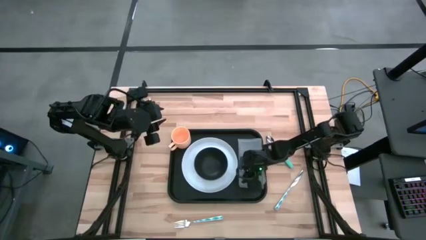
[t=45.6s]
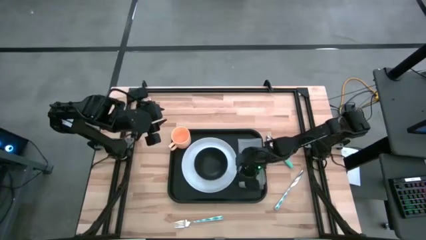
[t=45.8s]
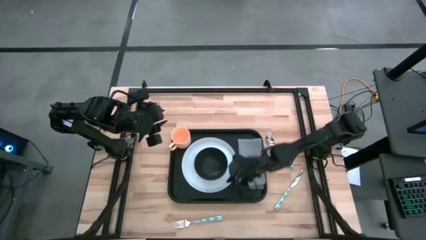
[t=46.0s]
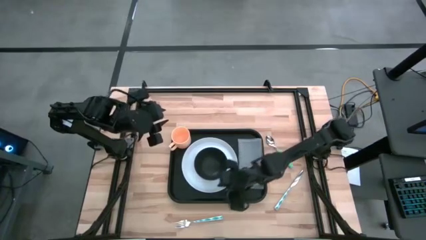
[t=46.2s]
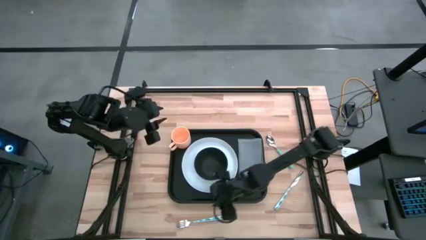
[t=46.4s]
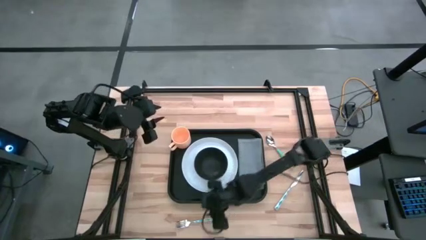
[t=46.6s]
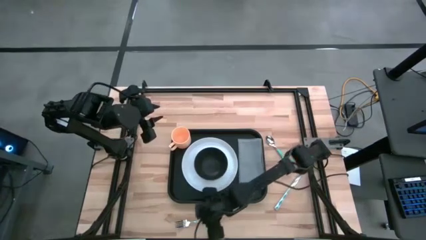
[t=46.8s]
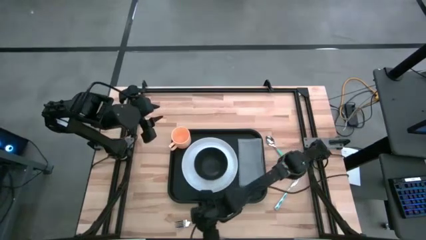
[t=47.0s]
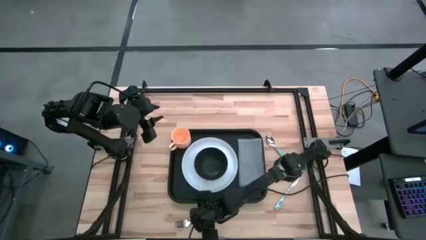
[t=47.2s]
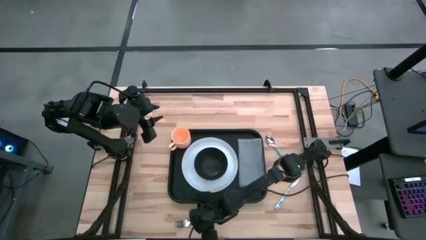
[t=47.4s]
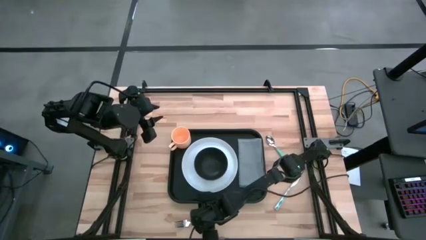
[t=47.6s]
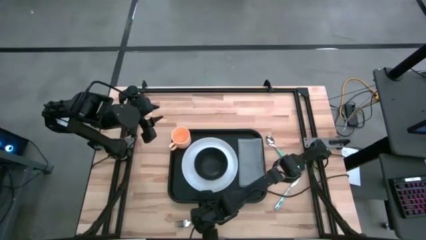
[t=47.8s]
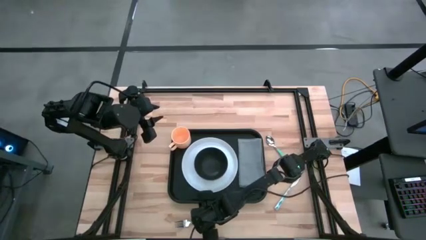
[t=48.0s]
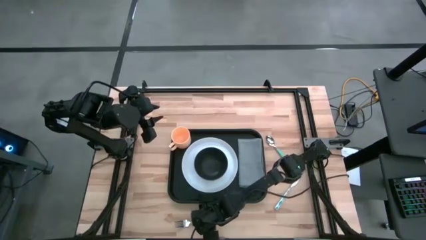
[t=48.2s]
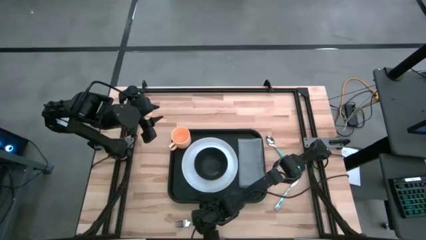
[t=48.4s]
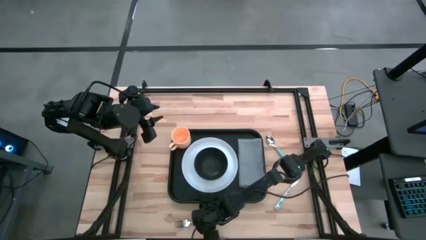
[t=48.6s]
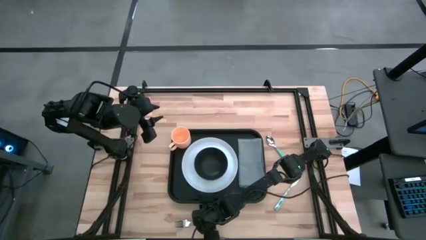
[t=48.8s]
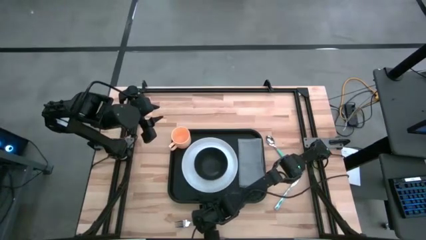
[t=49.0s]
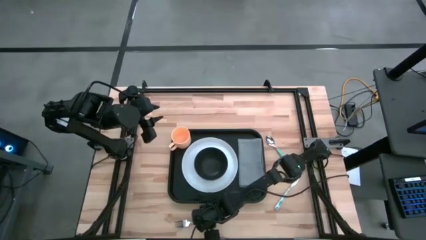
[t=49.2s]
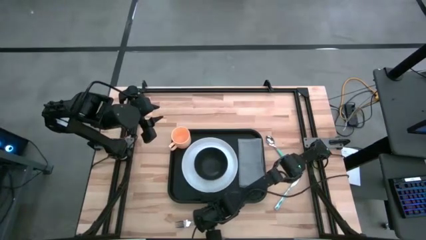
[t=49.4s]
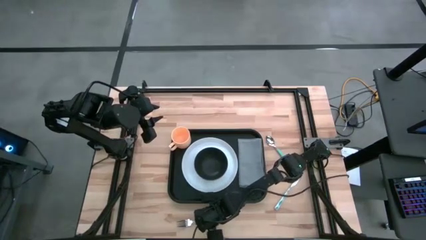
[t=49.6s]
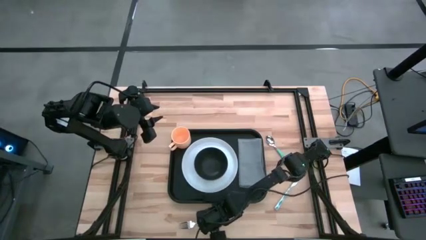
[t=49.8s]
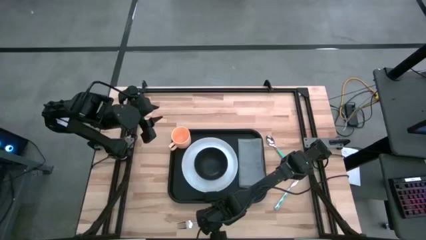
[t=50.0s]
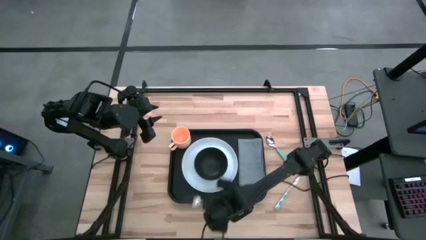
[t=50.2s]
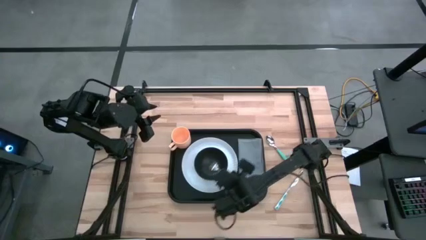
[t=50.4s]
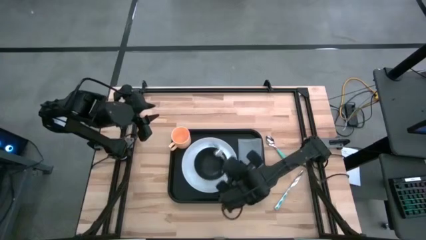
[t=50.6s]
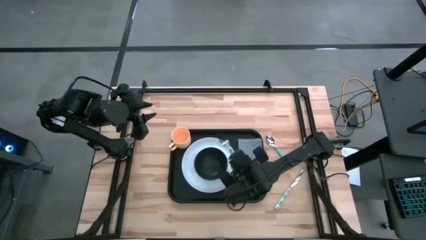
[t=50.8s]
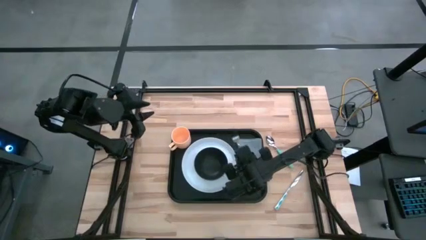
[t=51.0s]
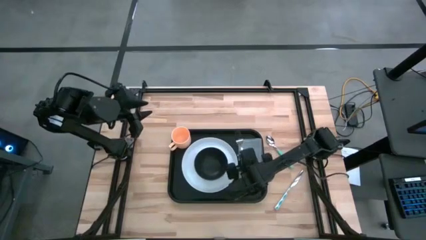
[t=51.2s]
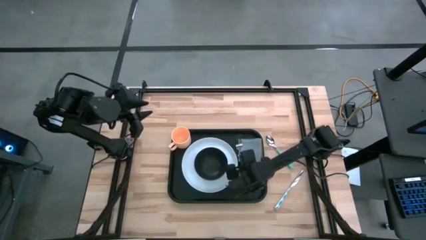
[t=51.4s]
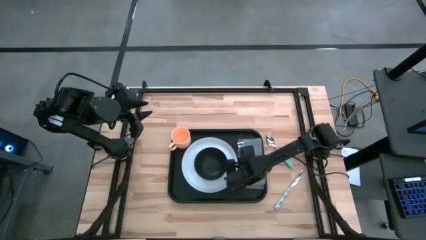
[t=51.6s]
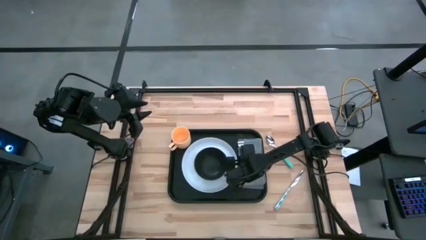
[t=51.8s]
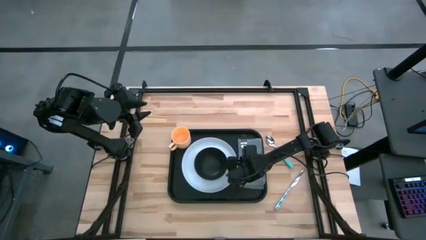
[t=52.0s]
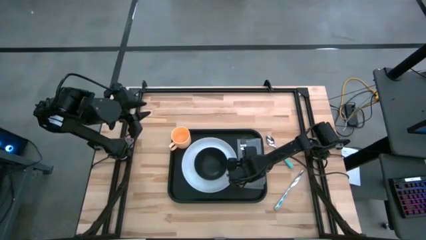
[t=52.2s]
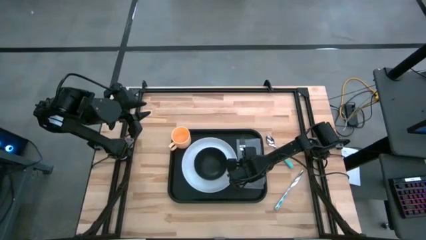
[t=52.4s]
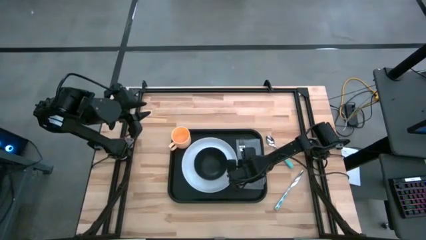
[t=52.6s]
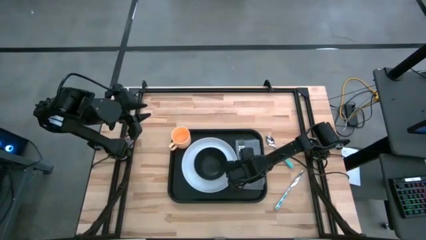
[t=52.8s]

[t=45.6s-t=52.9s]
Task: Set up tray
Put the blue patterned fork on top of the gray napkin on the black serving tray

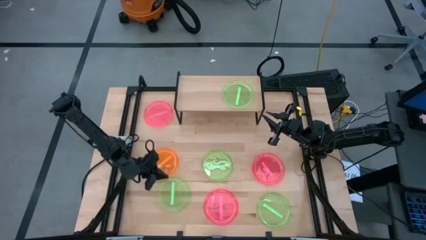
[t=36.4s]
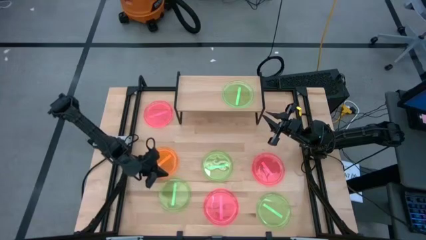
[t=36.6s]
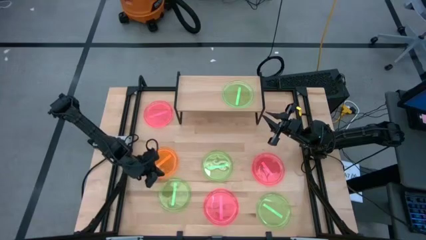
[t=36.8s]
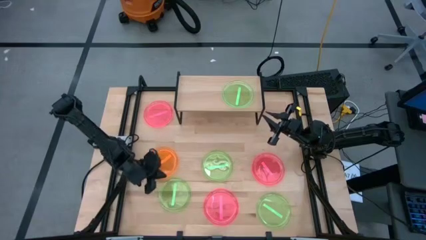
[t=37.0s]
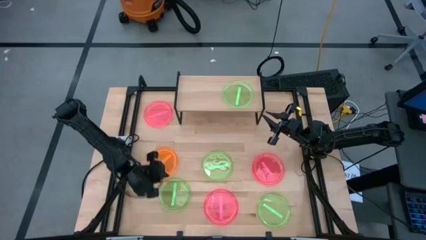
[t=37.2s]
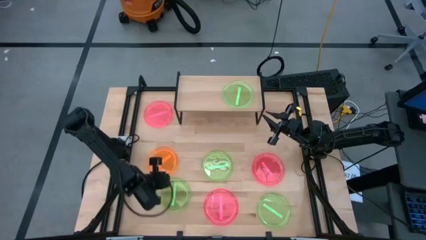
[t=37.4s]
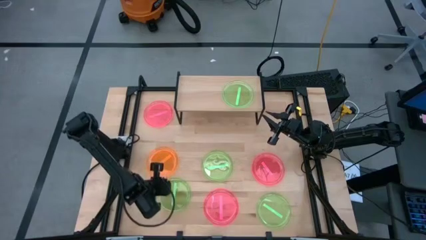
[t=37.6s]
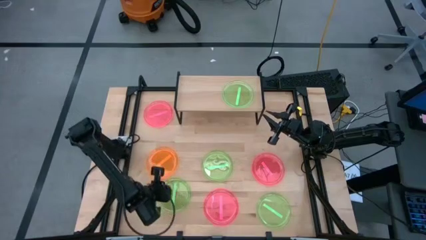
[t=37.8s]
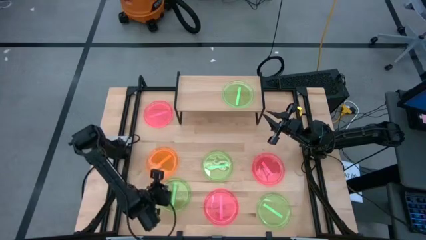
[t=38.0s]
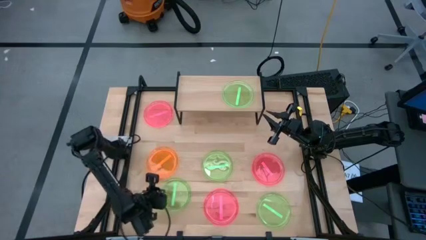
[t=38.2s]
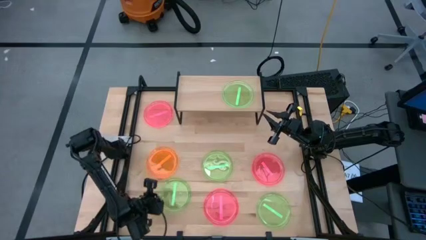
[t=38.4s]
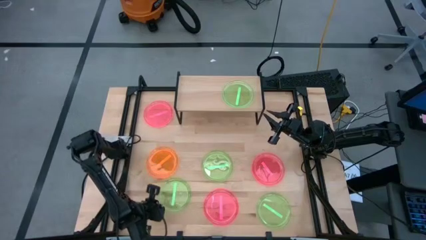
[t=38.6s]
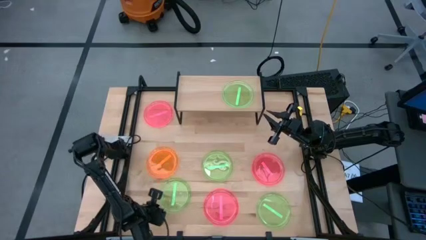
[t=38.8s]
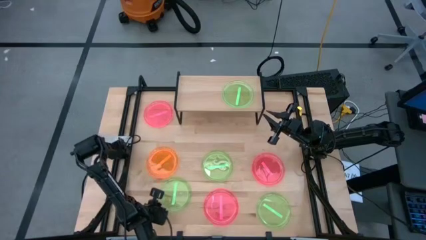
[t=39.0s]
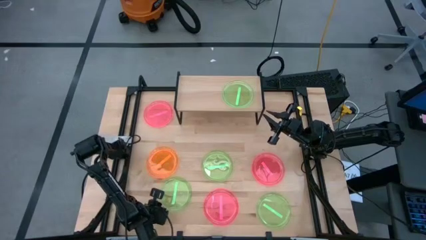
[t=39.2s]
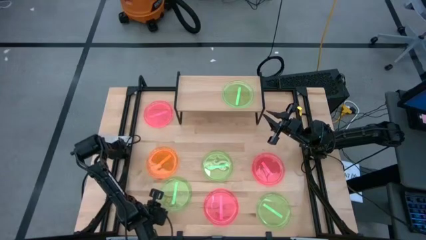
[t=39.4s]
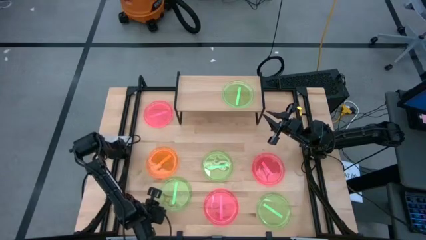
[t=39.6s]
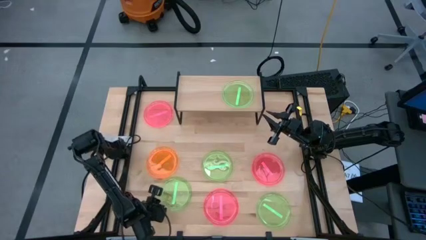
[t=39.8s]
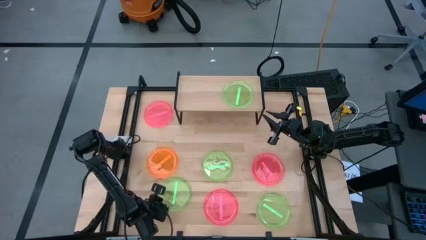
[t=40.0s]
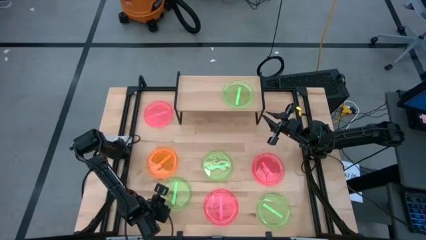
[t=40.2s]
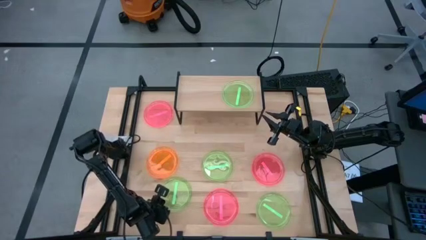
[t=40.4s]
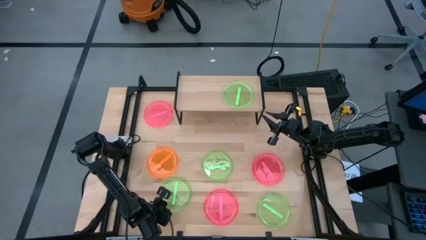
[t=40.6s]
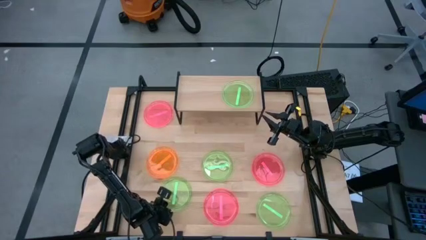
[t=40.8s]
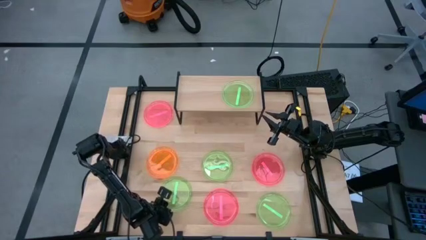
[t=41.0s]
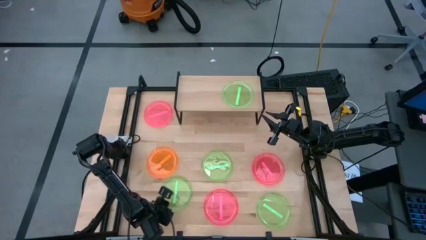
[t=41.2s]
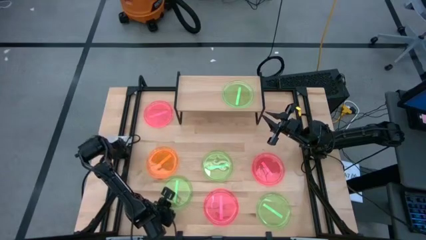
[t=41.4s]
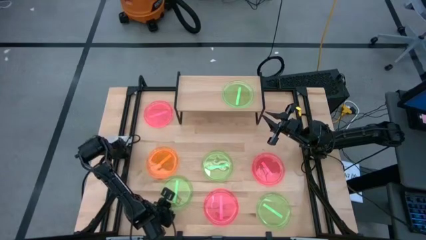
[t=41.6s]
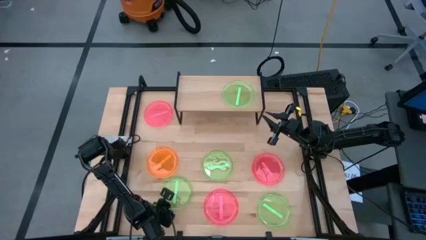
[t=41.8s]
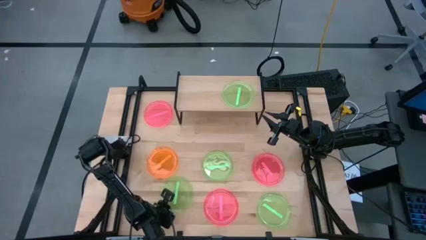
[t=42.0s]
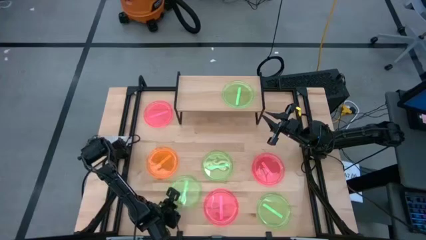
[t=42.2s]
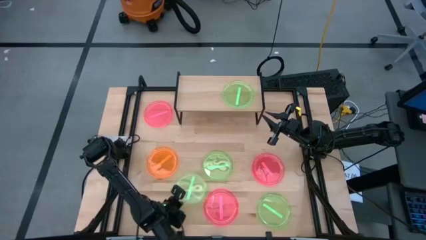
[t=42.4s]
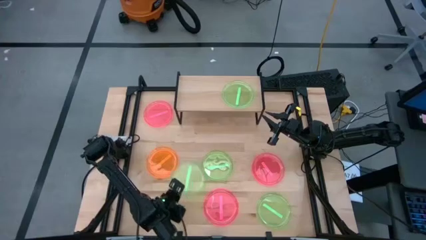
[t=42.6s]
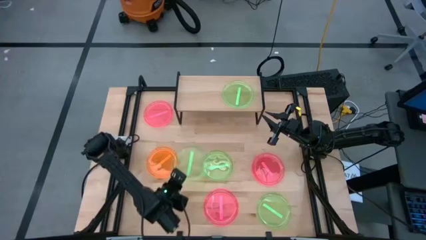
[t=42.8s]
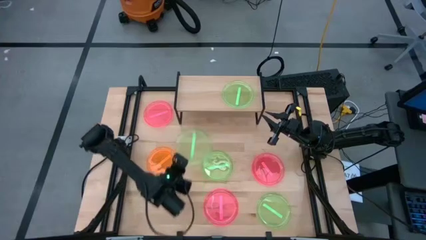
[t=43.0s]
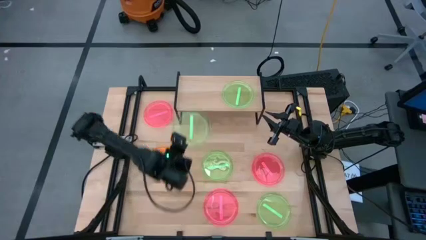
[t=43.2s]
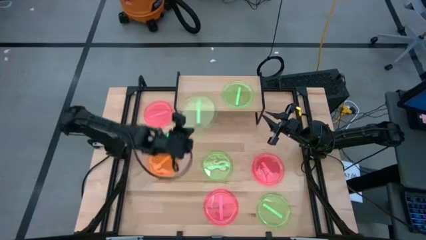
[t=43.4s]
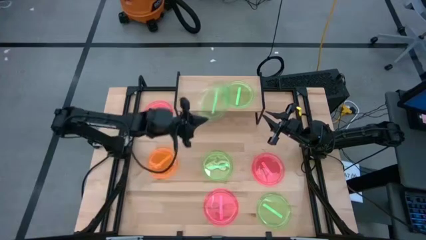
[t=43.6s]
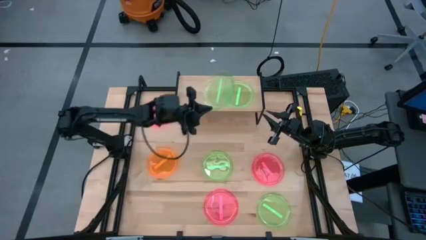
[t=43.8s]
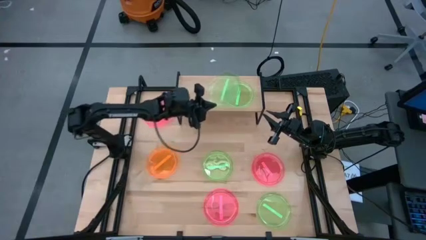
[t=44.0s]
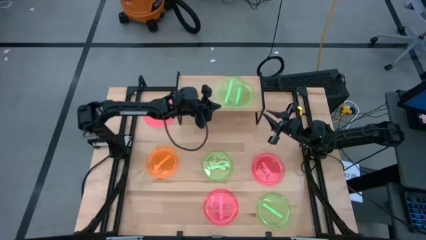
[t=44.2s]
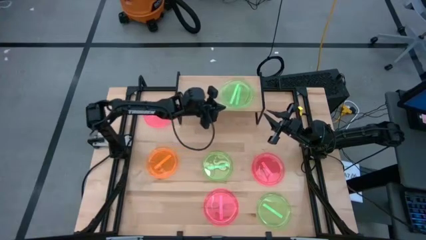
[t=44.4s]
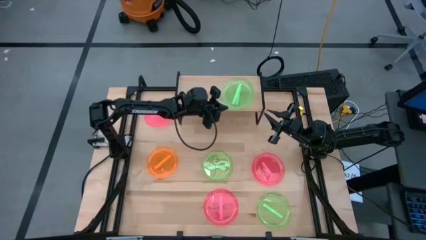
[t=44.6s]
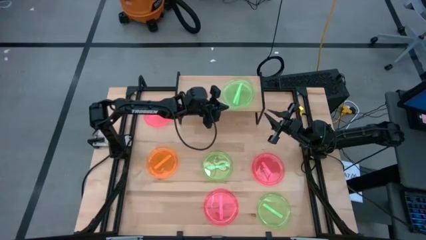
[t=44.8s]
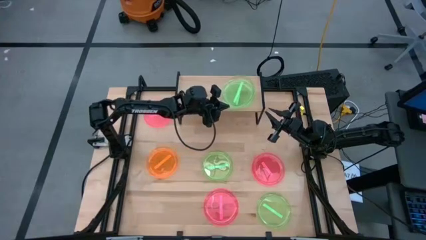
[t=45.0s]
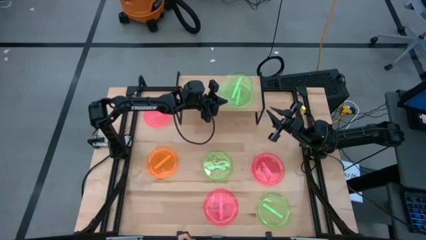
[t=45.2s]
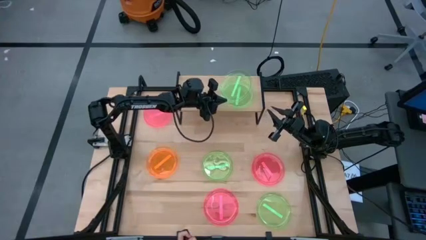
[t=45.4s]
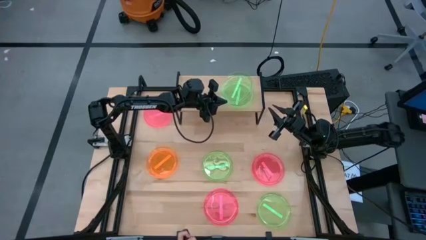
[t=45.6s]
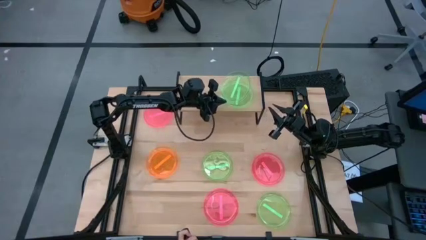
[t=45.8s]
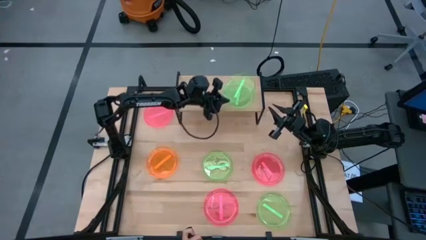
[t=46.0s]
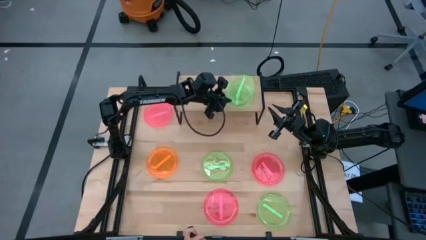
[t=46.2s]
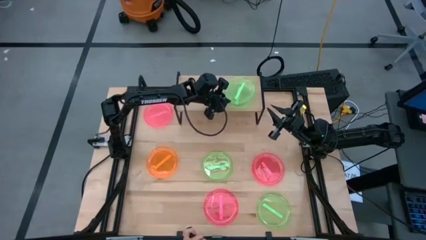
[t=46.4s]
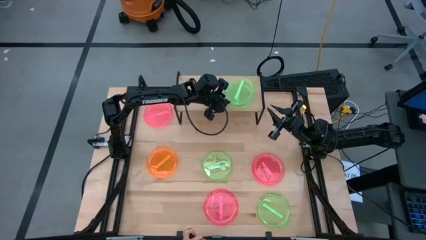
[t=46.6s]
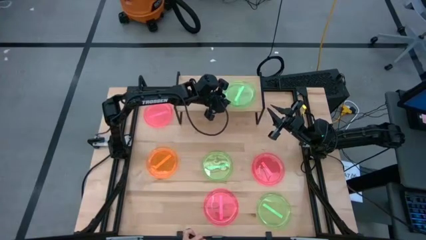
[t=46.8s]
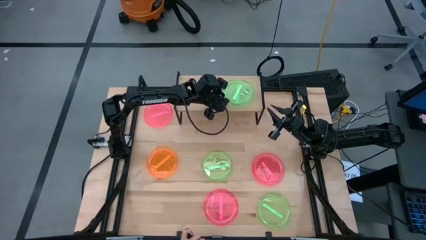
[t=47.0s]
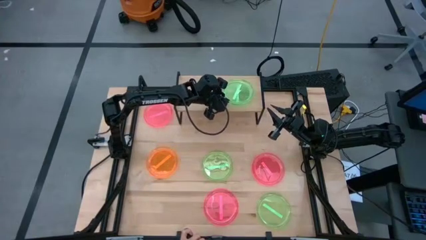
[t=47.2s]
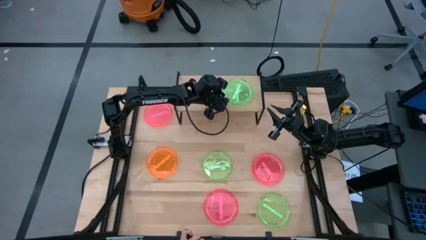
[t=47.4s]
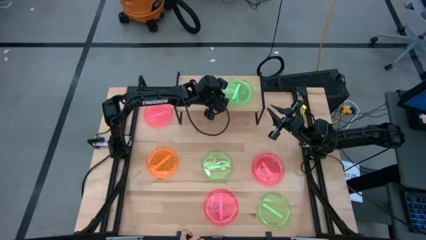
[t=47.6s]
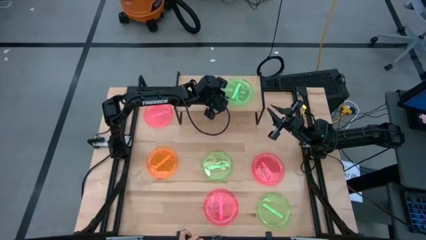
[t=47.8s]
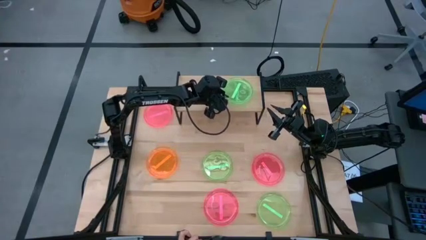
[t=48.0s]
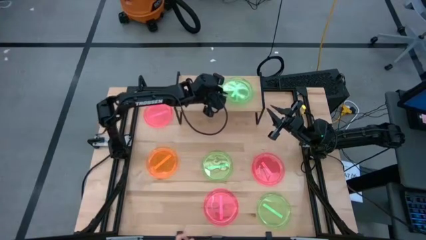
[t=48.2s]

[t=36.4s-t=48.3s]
Task: Place and stack plates onto a shelf
Stack the green plate on top of the green plate on the shelf
